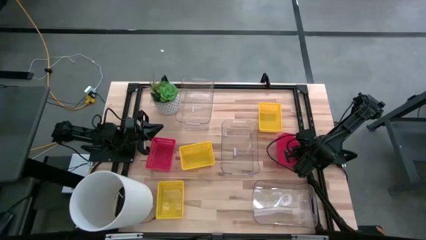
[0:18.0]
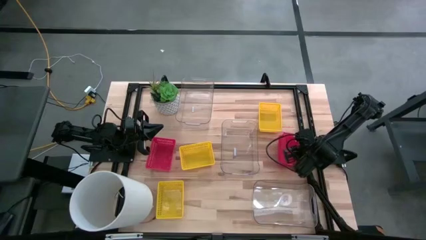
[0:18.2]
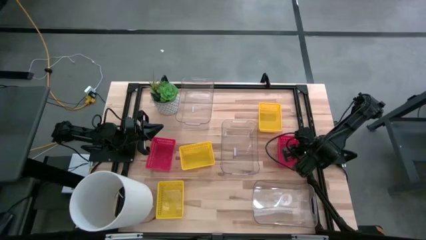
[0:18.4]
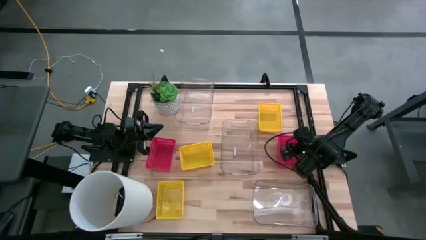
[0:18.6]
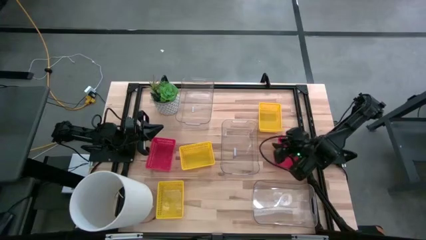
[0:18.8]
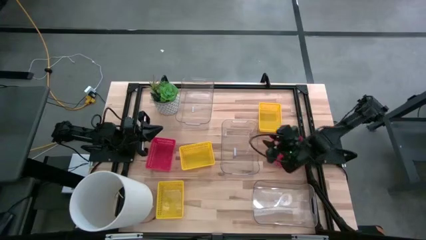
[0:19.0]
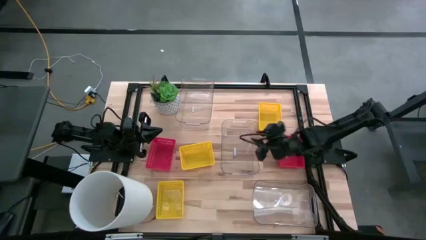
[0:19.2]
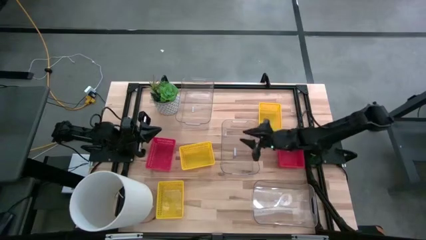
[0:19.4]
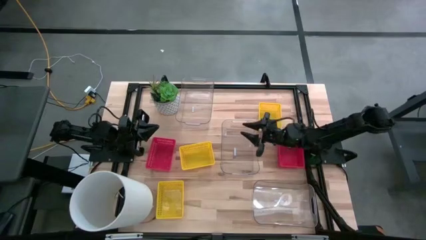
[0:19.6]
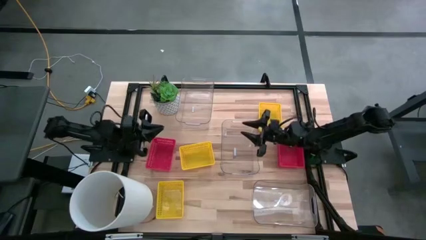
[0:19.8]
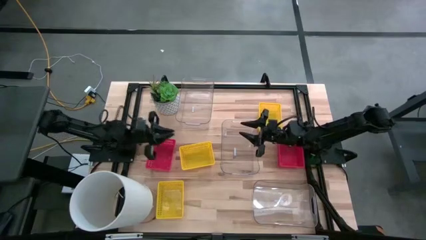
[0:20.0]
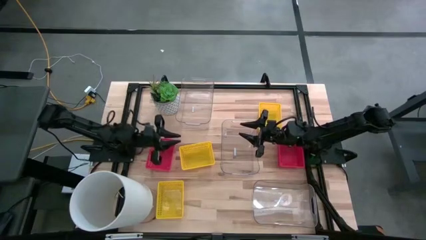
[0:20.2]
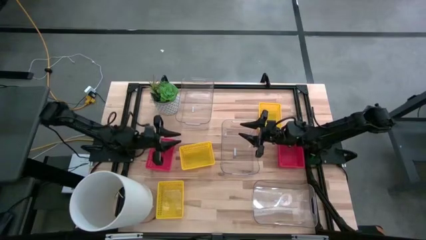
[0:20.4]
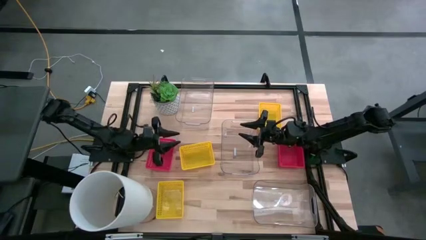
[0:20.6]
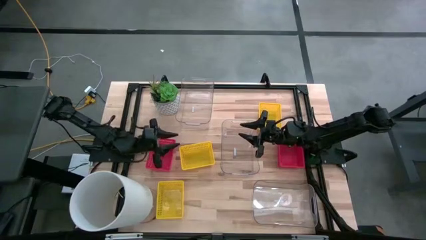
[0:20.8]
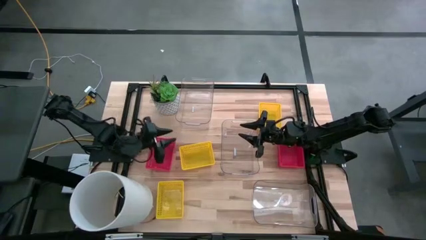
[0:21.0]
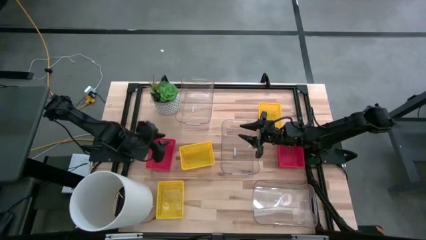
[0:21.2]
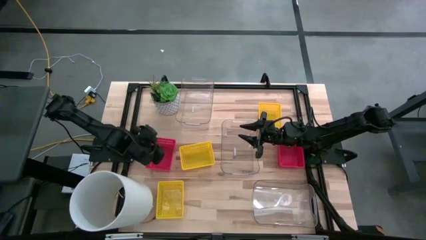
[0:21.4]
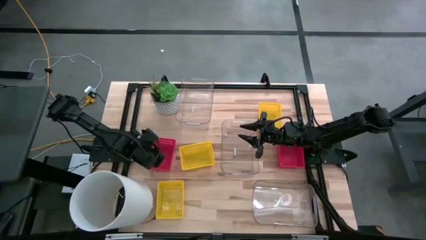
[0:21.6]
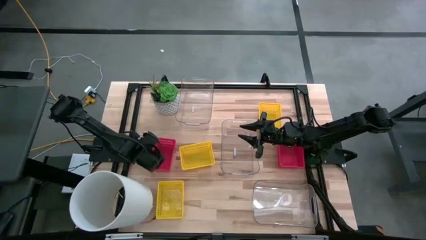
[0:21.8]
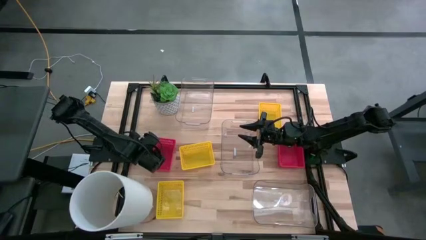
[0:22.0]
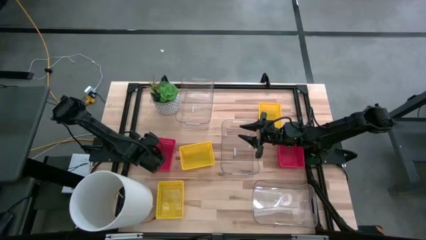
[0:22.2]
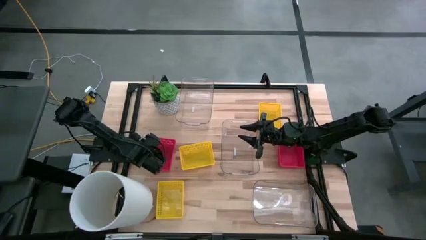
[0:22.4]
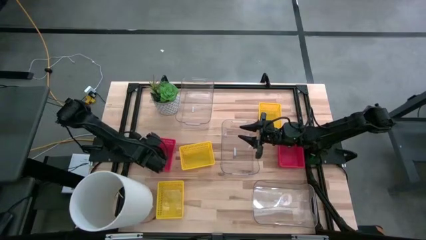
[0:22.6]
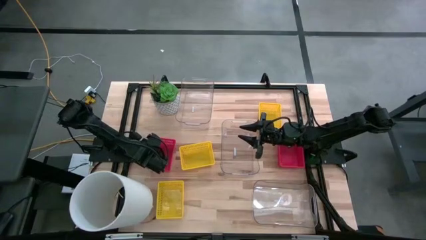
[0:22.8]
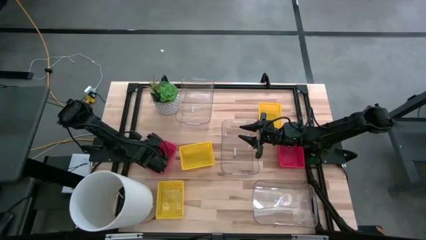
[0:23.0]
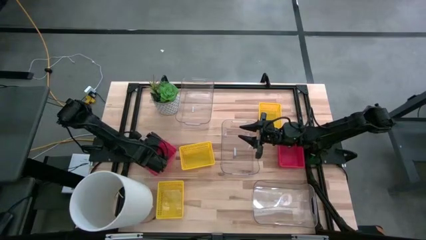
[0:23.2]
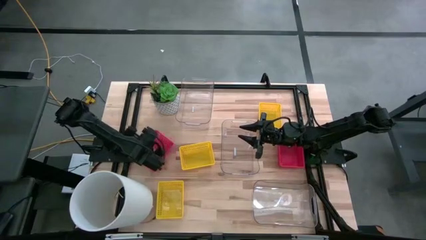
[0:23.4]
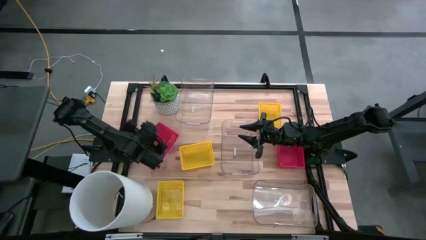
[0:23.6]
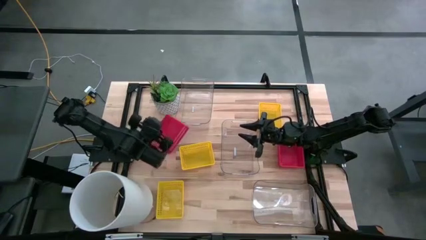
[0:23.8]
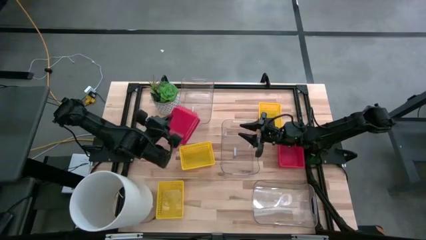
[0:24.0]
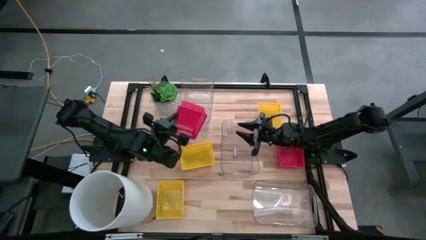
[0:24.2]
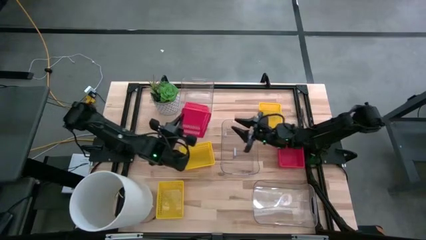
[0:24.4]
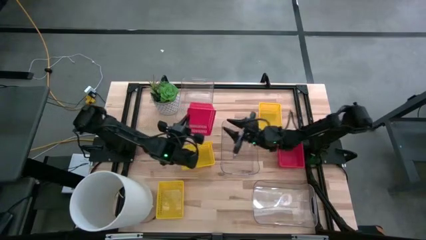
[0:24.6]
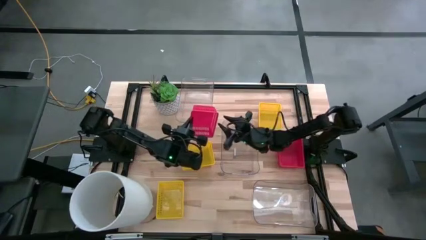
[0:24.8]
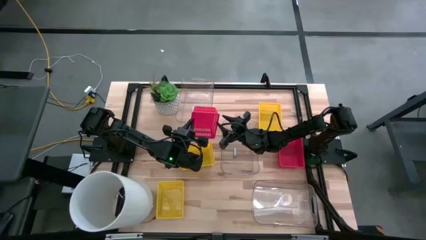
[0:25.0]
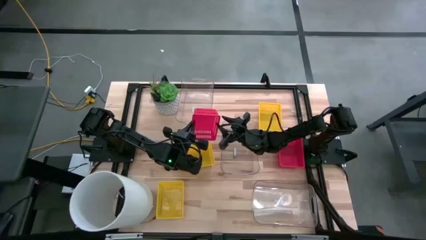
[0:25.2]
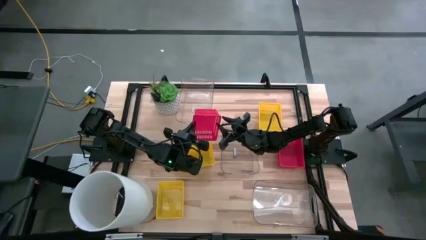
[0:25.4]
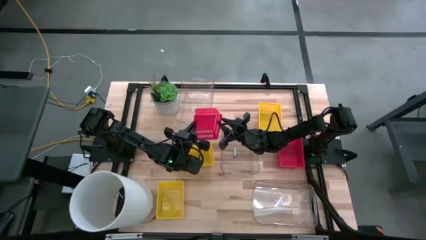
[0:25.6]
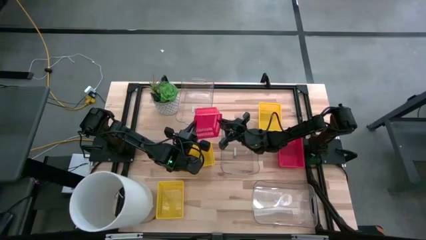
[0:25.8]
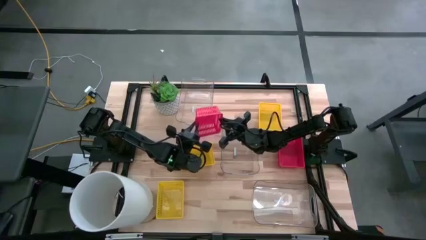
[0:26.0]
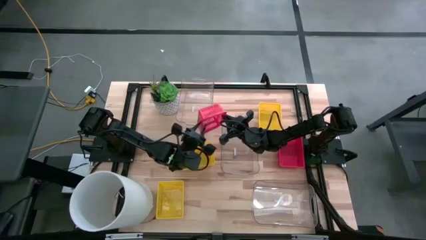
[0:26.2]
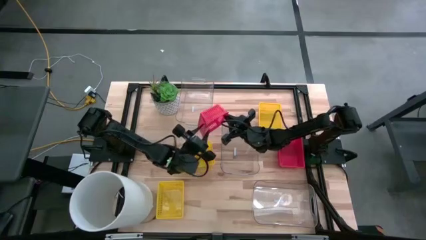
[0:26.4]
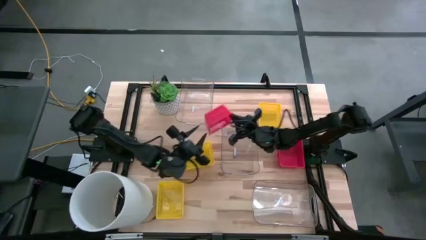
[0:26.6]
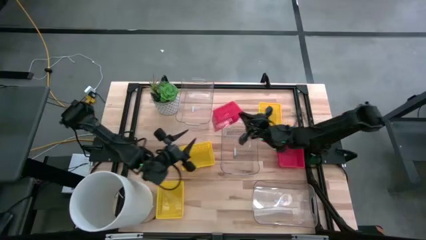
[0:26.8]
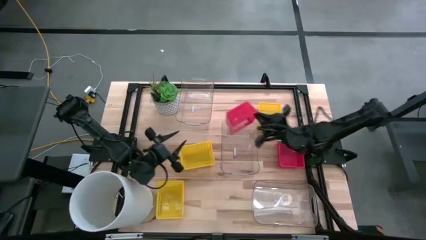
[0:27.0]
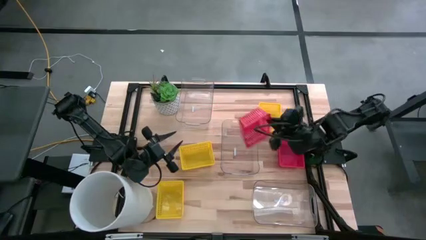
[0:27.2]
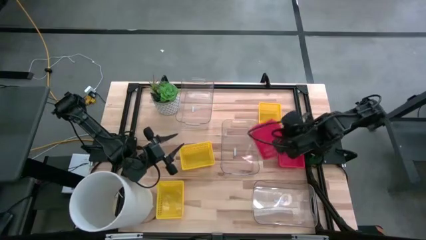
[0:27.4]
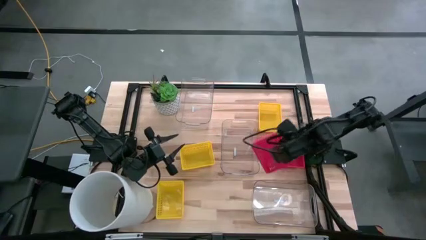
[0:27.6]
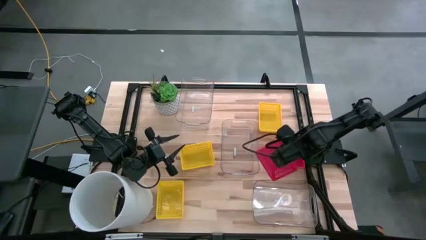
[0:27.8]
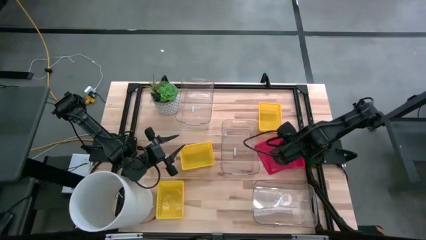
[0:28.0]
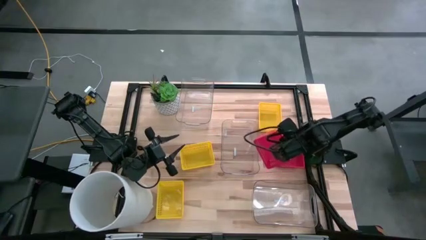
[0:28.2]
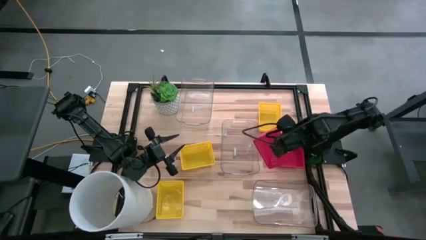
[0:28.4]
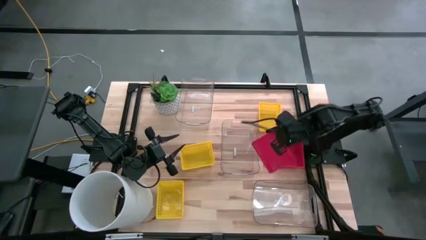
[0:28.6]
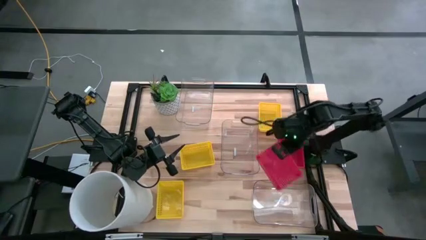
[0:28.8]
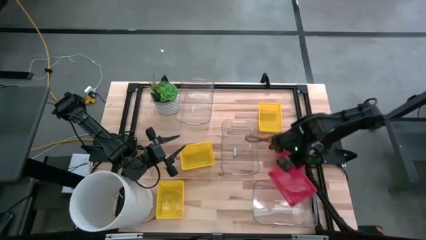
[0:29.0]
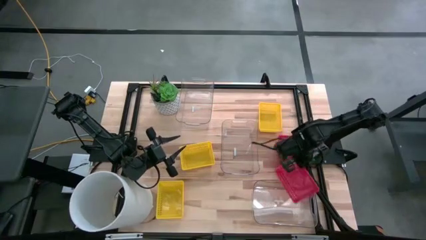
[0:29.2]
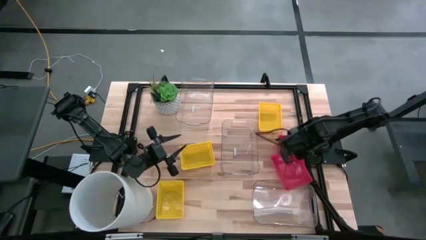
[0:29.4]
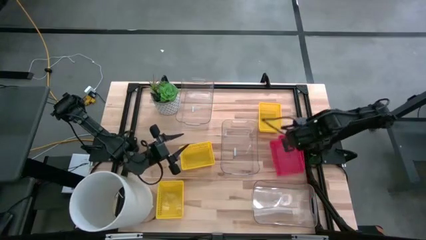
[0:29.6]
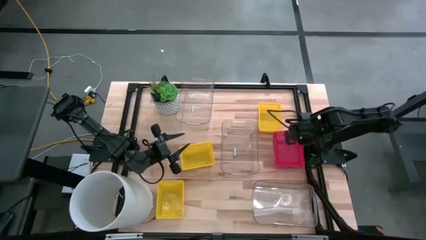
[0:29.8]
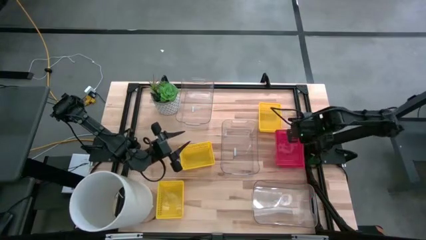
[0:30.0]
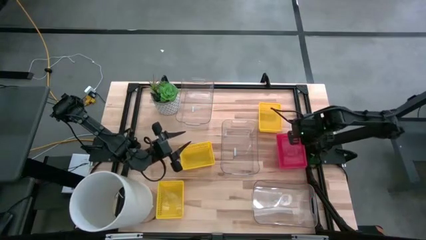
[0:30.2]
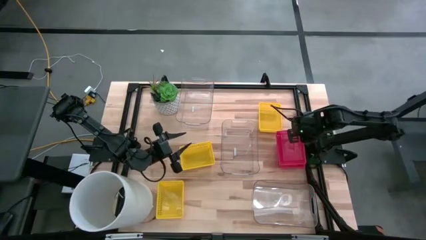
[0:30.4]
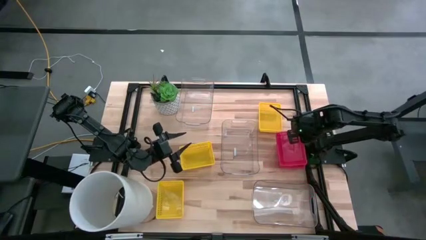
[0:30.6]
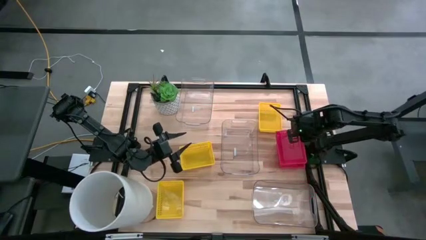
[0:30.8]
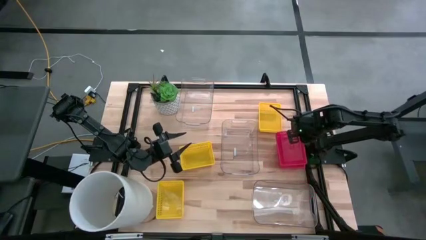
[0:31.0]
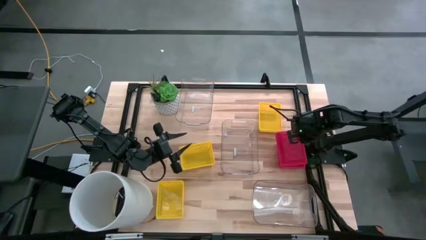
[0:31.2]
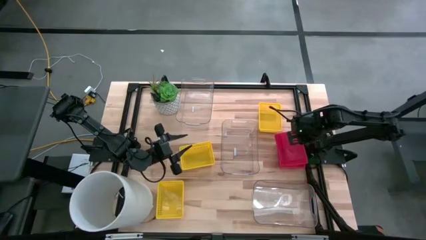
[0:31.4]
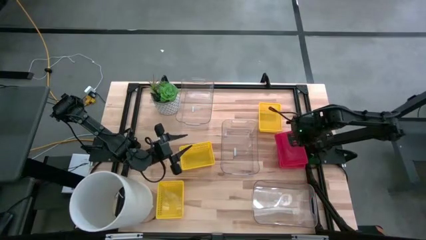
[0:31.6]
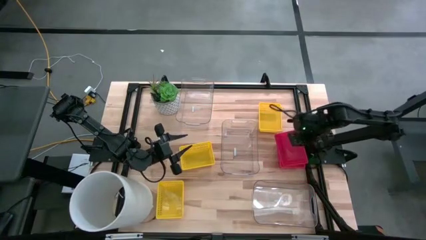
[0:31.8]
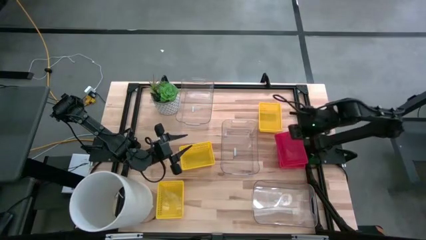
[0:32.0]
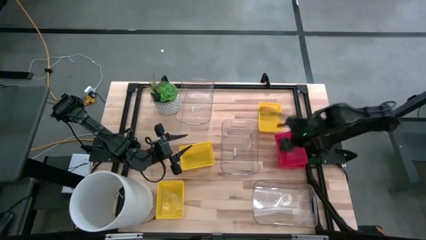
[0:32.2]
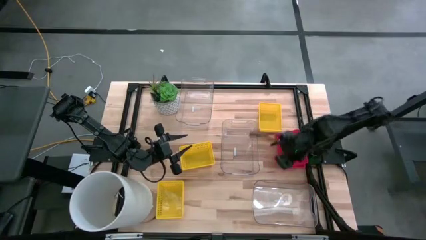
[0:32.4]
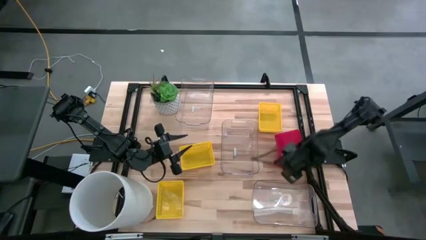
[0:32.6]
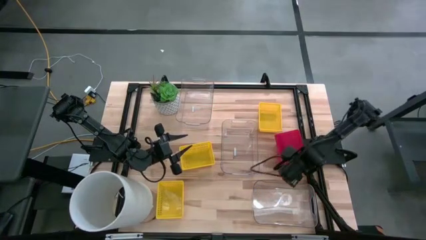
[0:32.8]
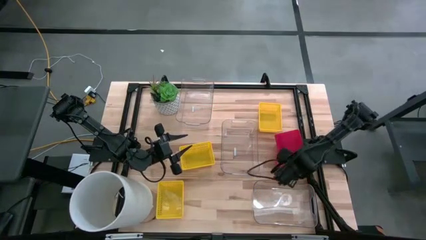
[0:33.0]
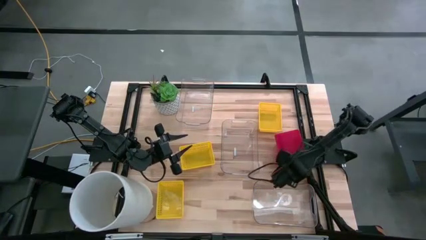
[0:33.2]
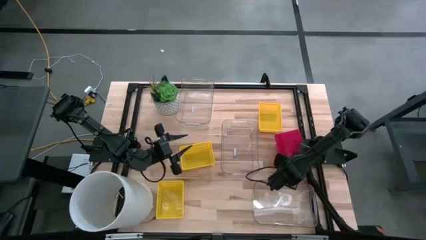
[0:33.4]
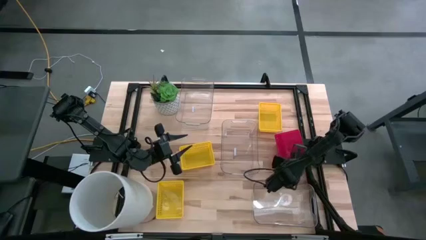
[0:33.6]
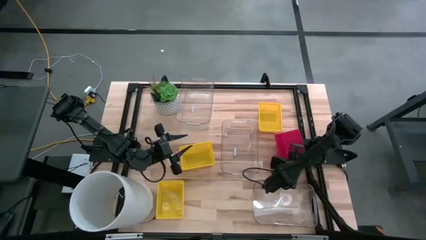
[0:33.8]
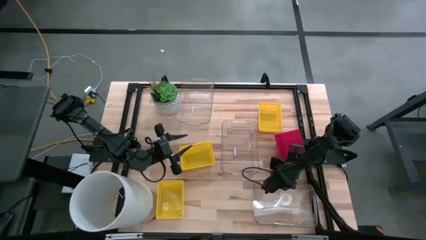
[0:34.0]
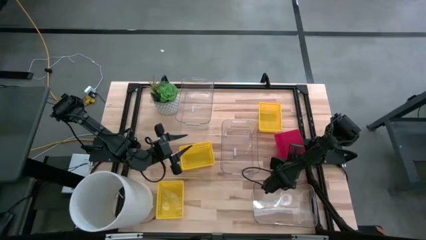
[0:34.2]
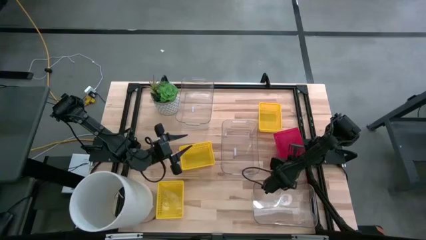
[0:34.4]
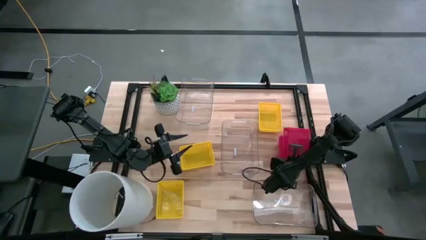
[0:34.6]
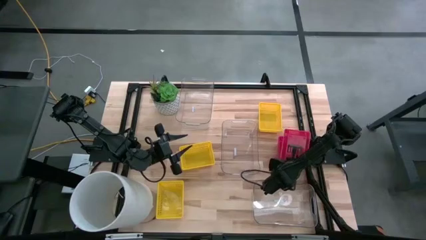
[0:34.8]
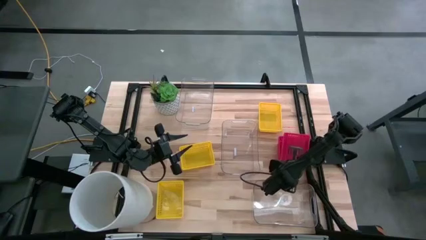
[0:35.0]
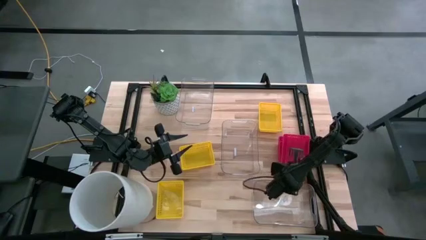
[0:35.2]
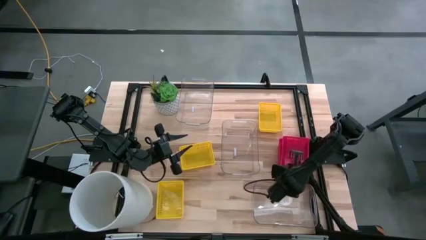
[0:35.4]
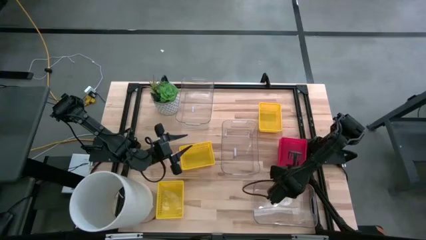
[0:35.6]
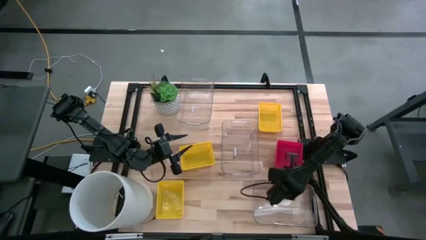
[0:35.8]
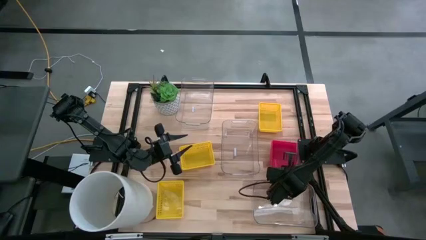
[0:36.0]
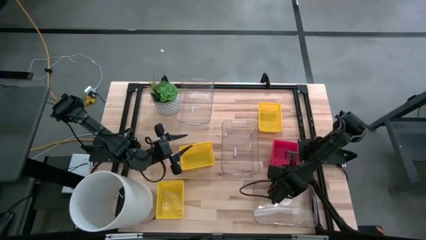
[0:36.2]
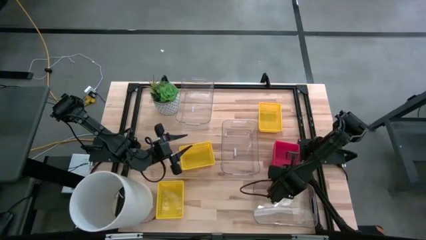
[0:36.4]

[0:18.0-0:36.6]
Stack the left red bin on the stacked red bin
